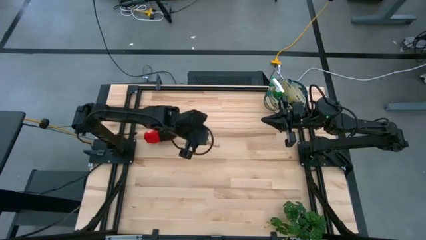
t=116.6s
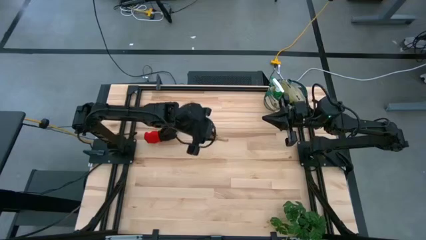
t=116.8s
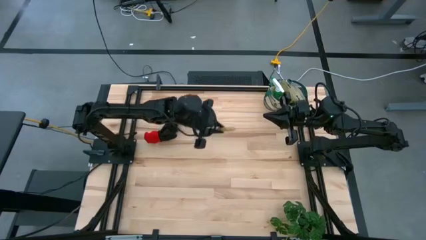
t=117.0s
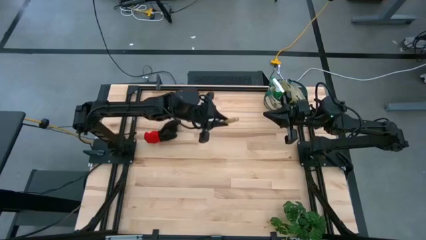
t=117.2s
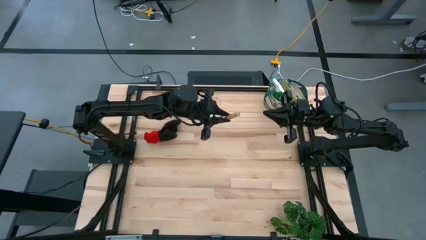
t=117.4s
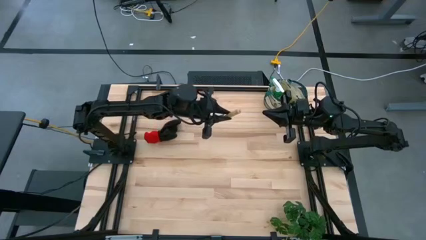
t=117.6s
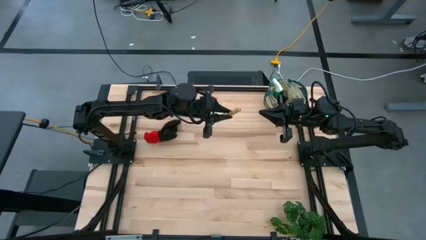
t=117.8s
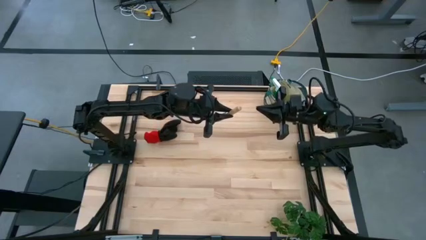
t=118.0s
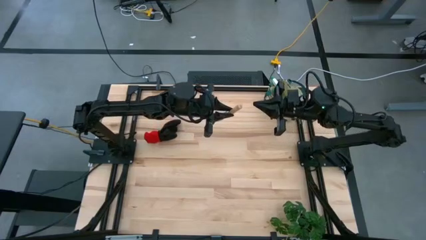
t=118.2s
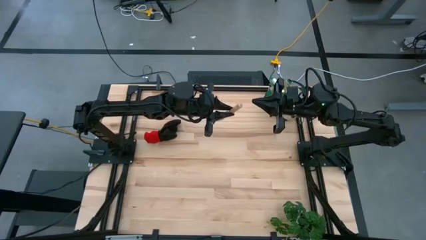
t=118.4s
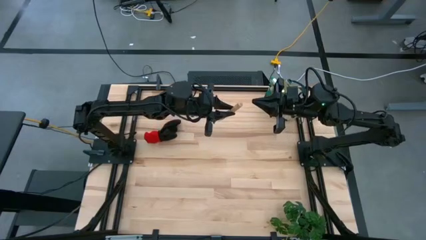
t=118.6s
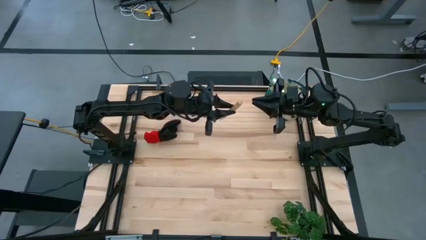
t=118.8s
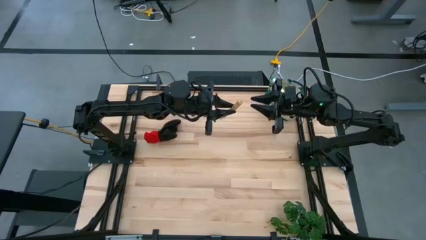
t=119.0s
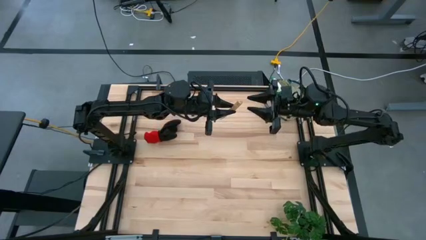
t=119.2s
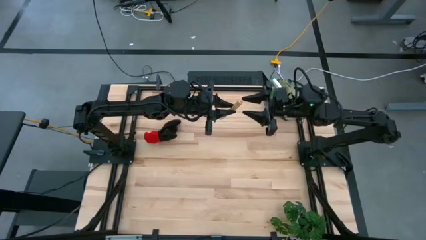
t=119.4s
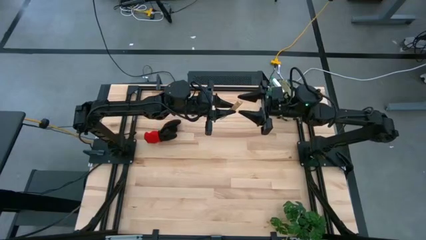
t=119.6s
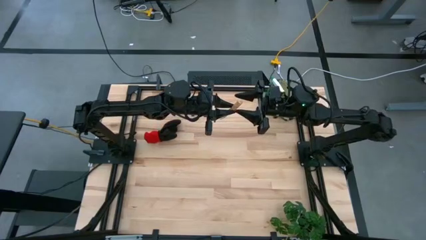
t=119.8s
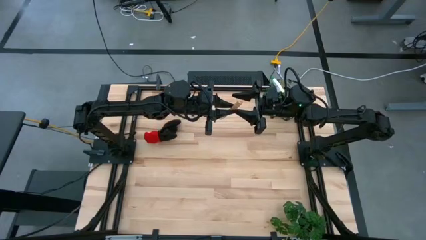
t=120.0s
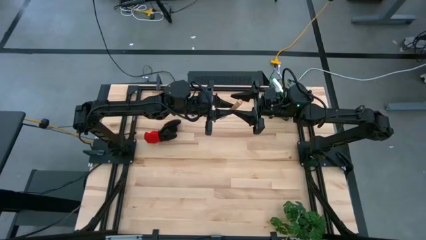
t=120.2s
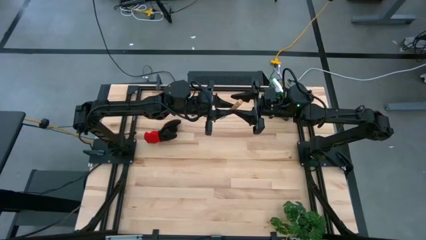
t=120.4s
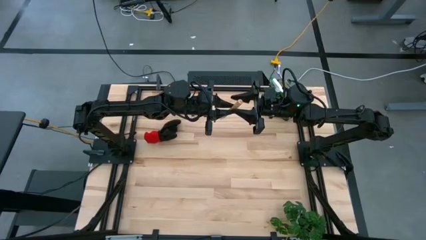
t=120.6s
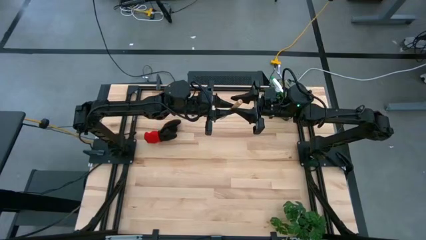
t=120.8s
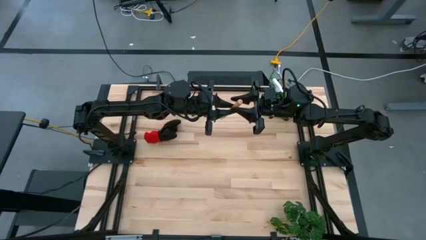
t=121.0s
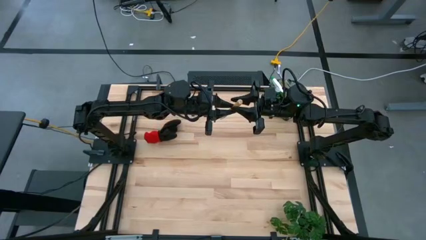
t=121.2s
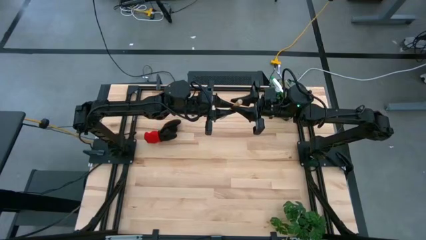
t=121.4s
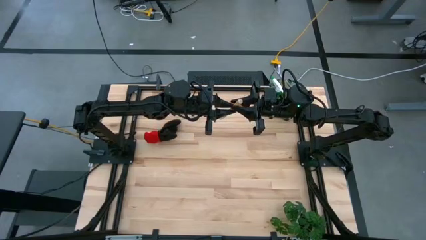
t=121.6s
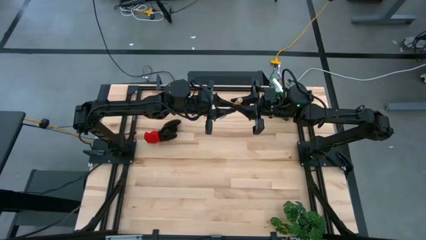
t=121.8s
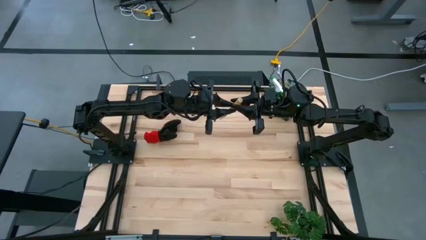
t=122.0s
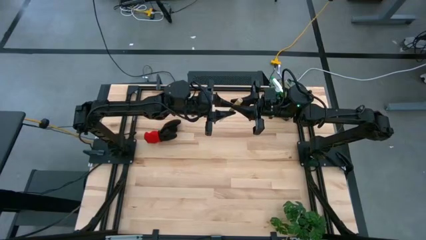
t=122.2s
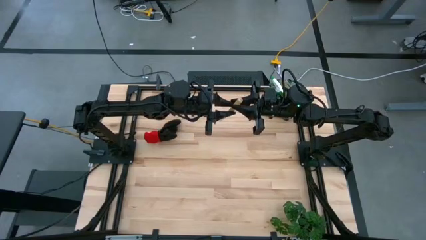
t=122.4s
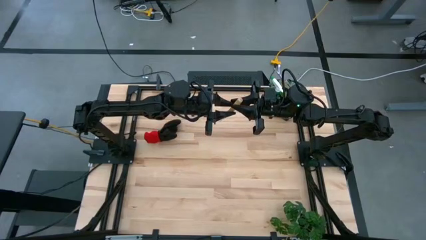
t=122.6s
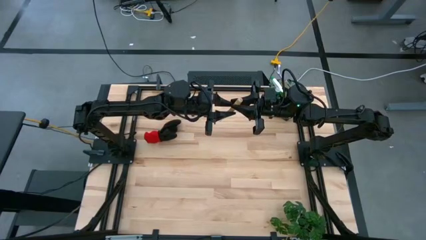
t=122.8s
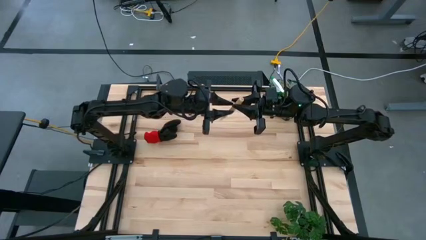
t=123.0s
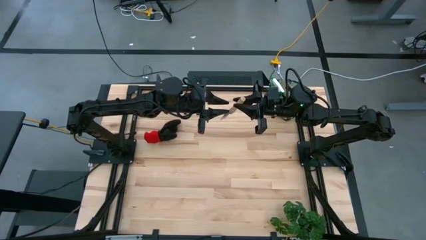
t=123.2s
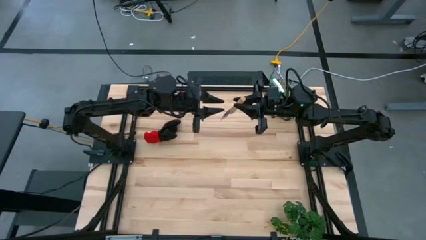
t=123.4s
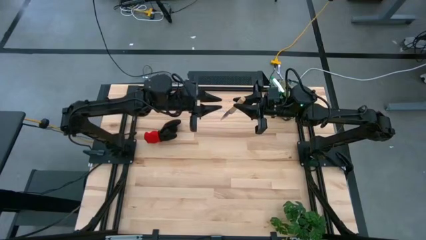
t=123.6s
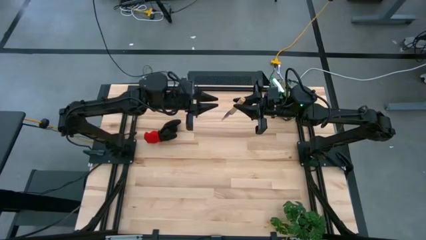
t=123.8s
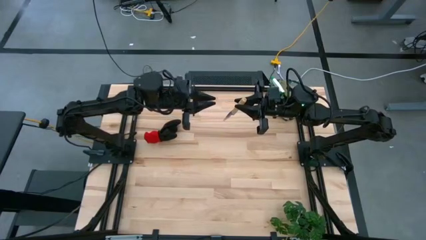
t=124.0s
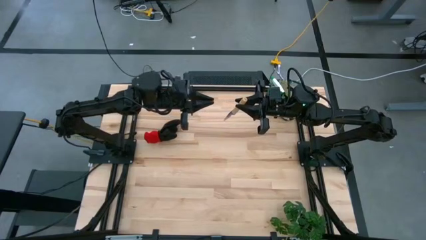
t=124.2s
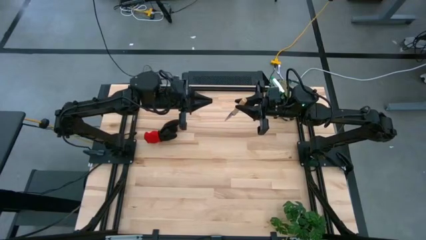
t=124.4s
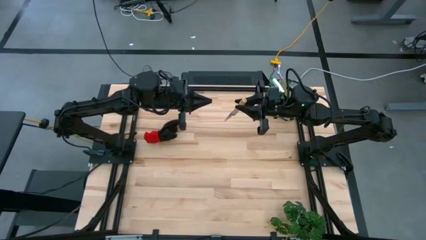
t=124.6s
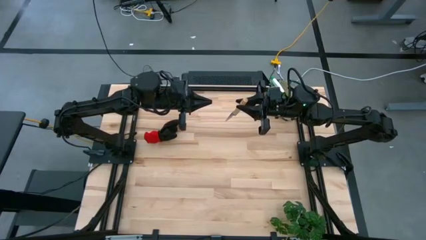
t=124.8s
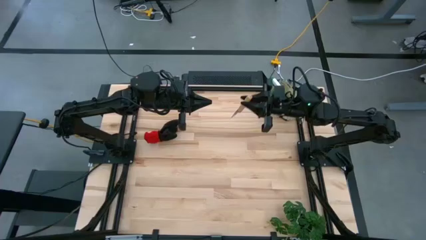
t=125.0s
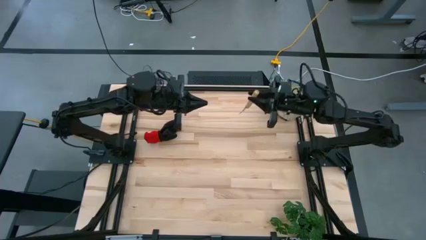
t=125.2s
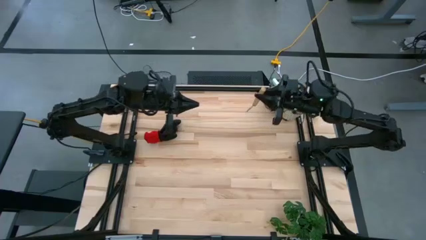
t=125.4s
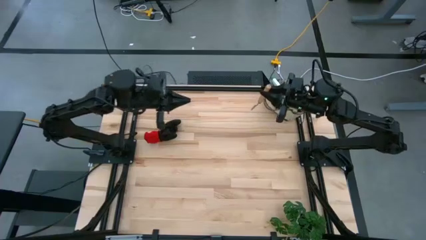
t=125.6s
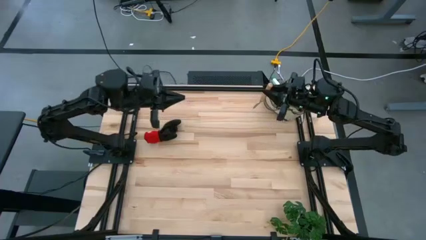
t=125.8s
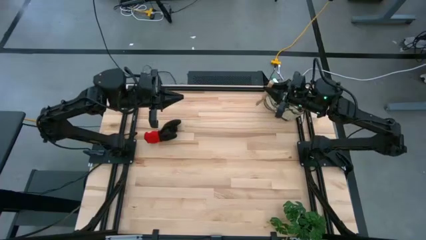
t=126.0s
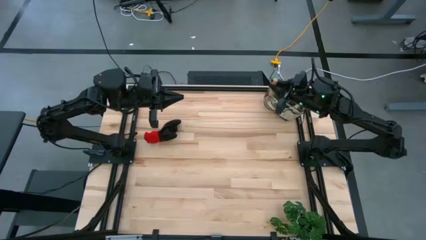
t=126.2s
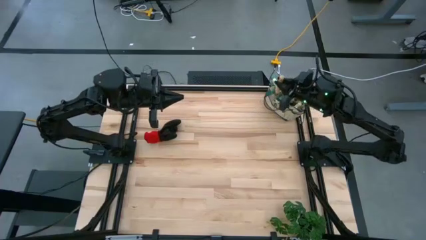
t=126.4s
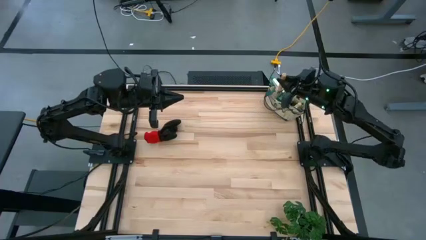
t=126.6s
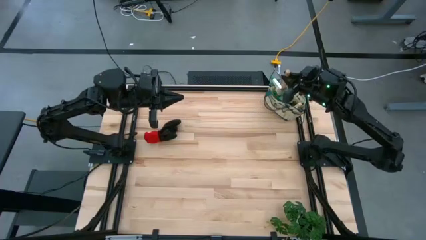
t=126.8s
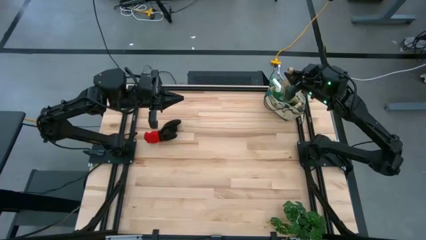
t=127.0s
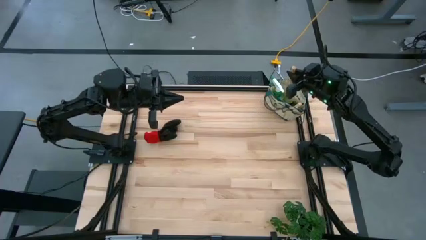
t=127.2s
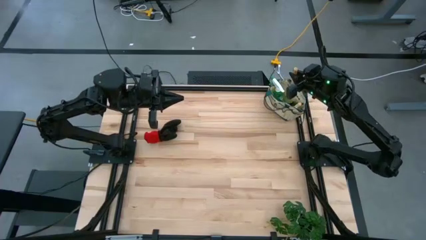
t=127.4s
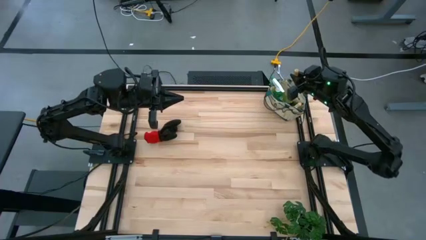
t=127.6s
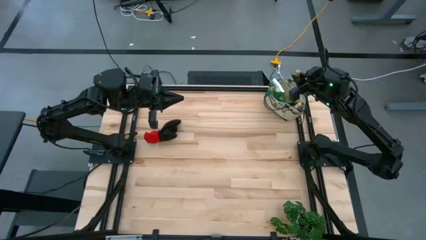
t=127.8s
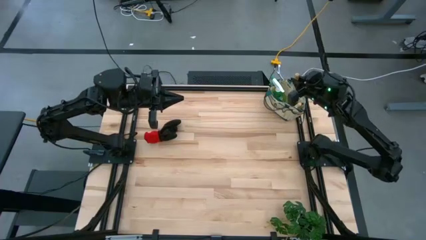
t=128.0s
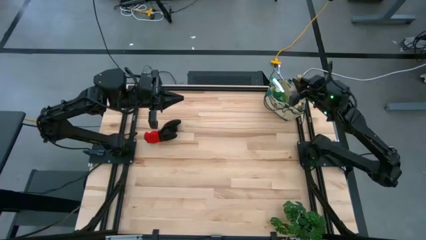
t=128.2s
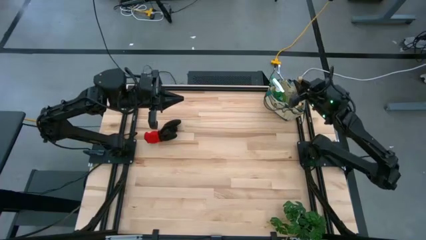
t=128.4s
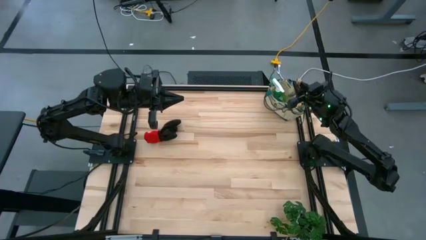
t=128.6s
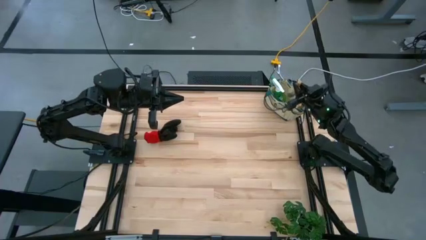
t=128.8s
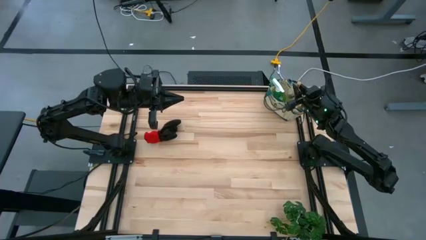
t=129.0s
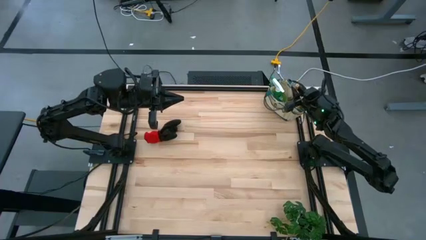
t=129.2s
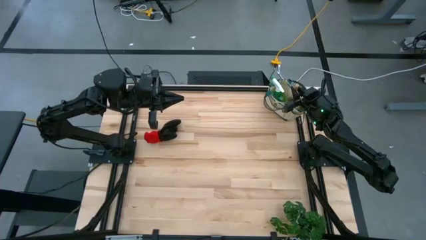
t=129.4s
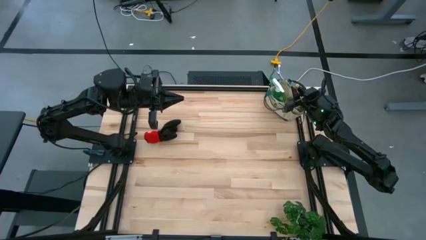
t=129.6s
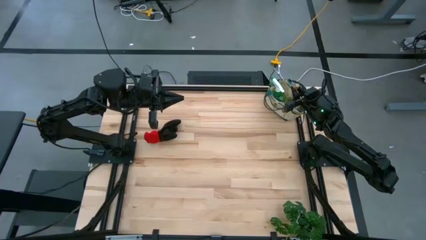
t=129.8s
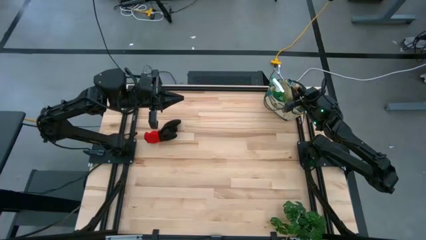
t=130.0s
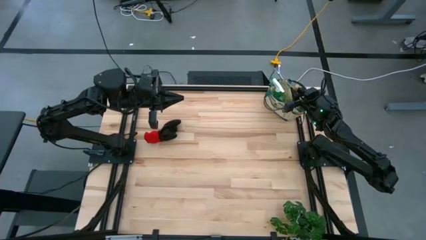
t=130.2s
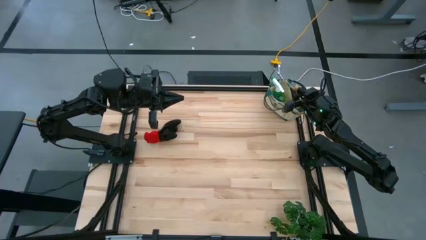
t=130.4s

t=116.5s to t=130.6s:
Task: Pick & Place Garden tools in Gardening bag
Put the trowel into the gardening bag
